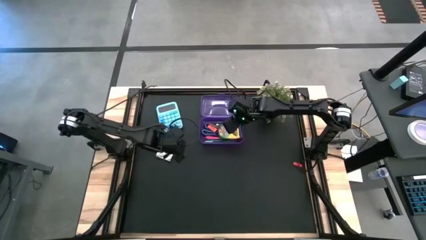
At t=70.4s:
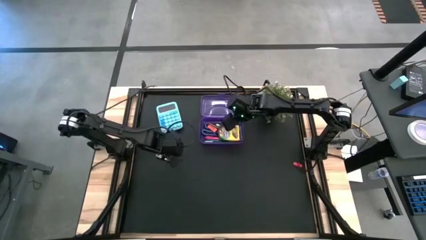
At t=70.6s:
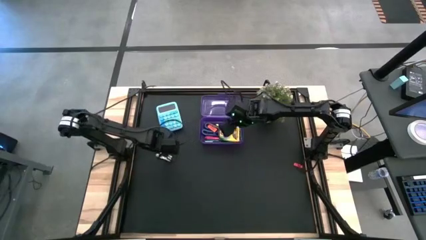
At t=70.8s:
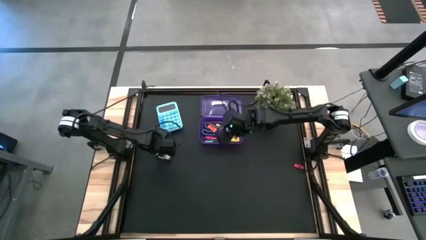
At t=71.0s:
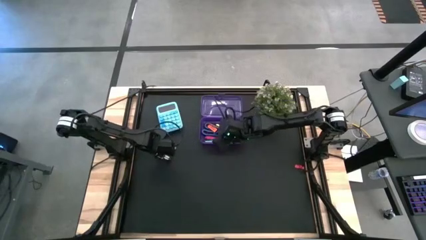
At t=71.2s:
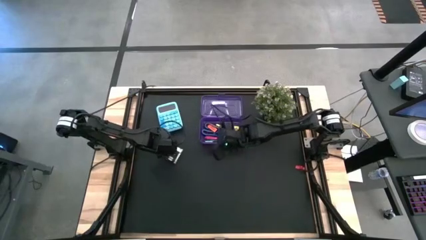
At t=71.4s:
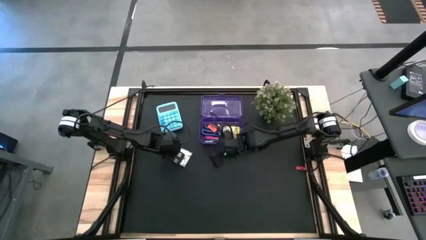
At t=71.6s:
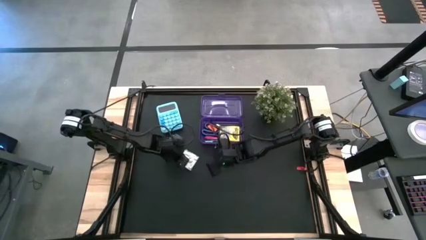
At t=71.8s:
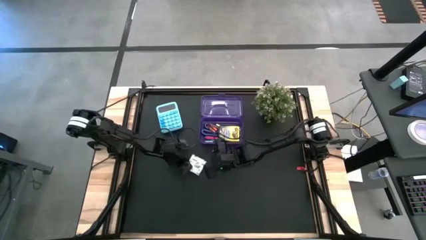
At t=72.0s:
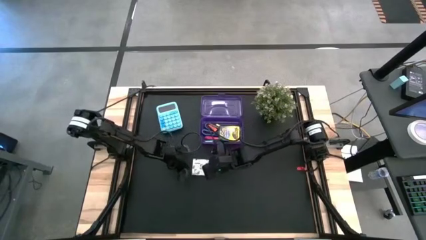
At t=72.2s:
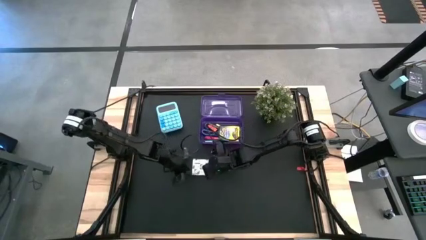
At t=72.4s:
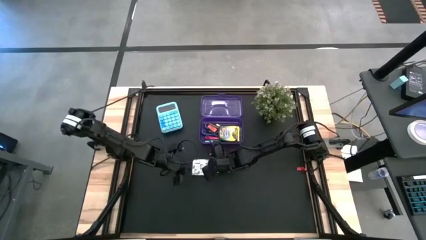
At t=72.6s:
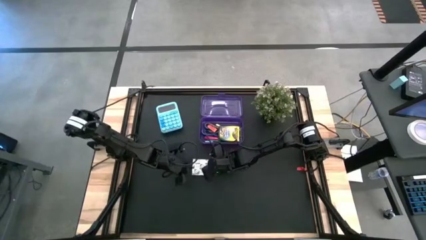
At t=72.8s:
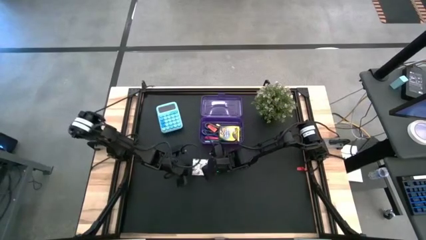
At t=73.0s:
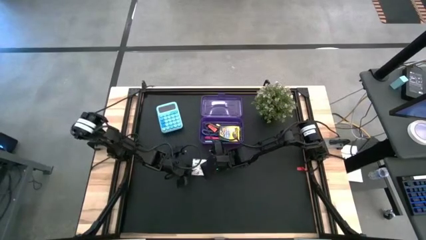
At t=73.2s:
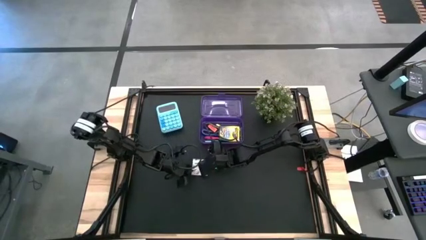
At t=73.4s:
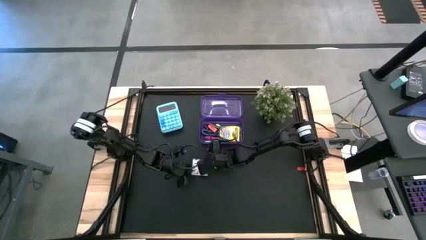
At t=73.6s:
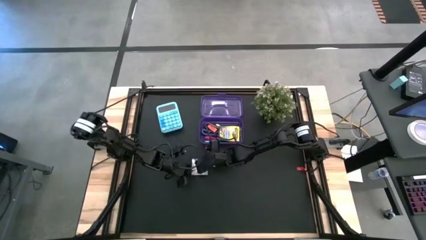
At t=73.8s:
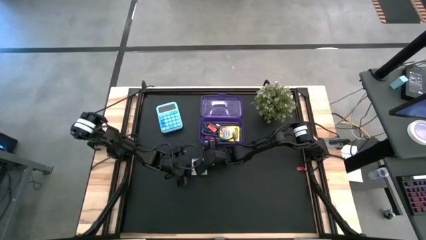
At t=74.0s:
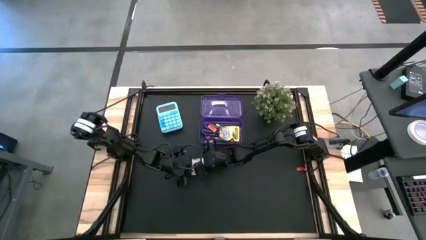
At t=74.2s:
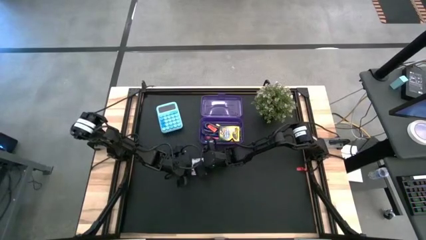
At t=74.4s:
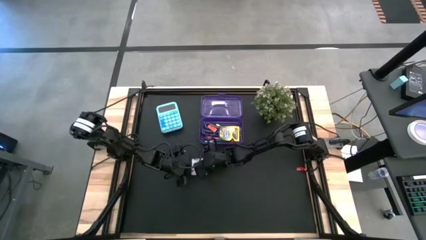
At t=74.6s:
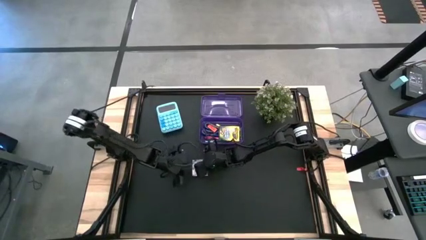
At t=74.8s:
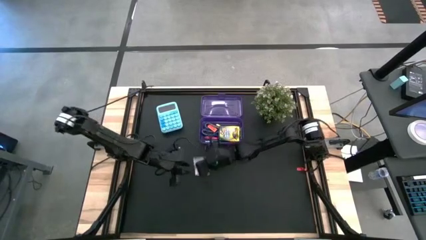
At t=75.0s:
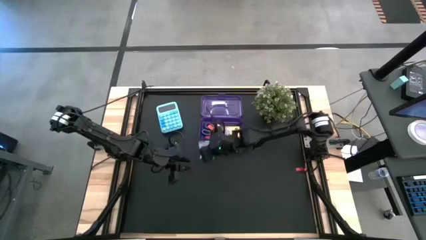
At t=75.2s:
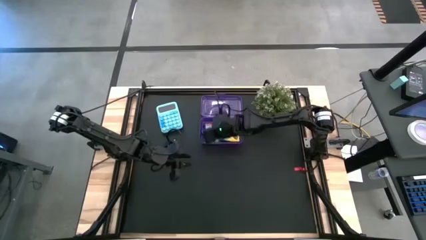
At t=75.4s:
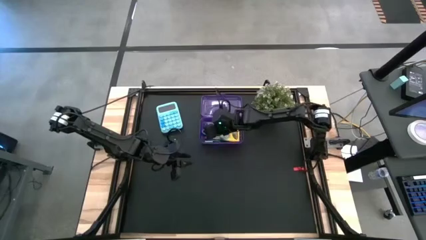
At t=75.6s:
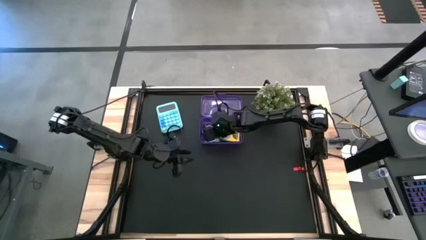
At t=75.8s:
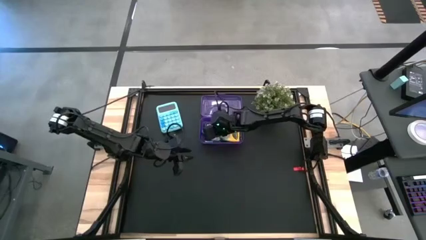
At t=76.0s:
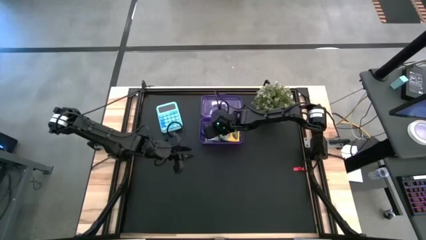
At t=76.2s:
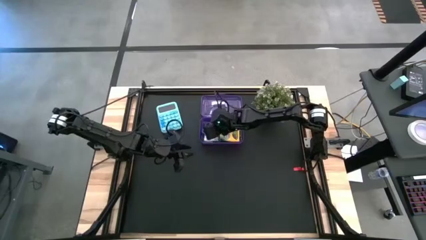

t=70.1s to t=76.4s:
Task: Pack school essentials
Put the white black sticky note into the purple supply box

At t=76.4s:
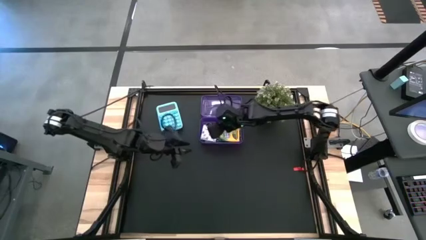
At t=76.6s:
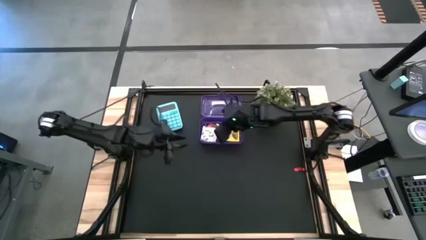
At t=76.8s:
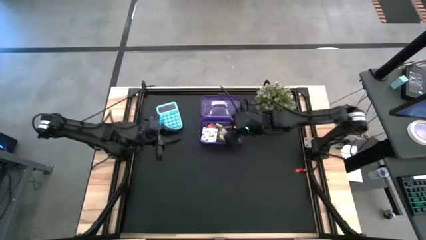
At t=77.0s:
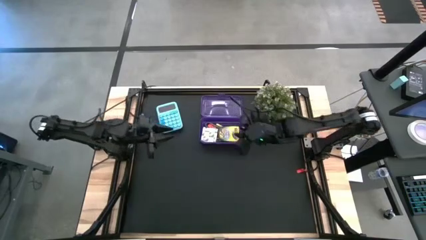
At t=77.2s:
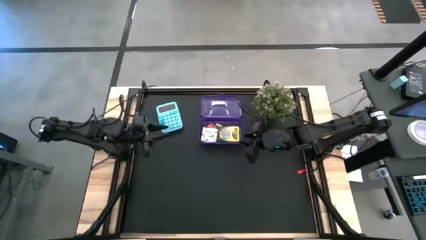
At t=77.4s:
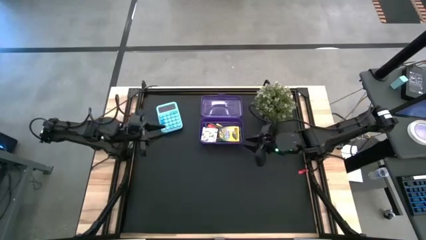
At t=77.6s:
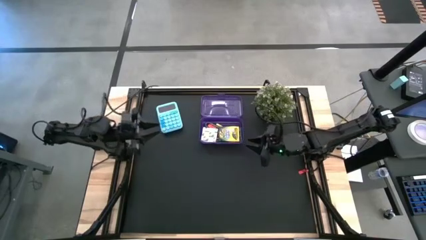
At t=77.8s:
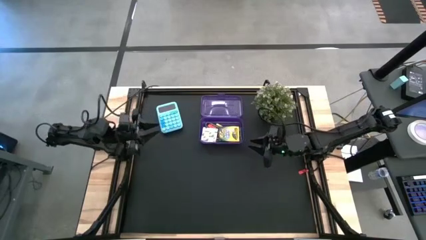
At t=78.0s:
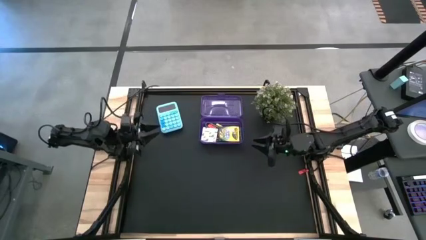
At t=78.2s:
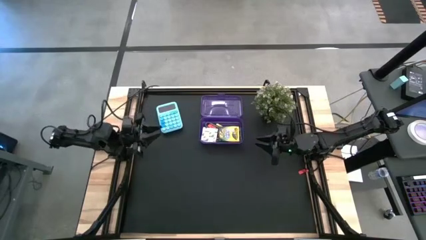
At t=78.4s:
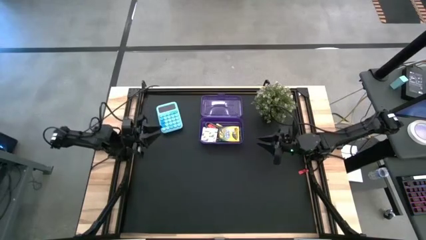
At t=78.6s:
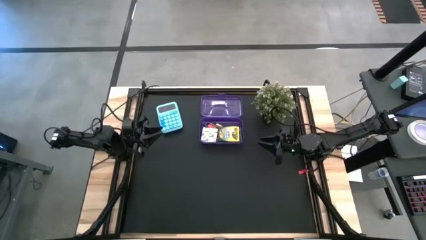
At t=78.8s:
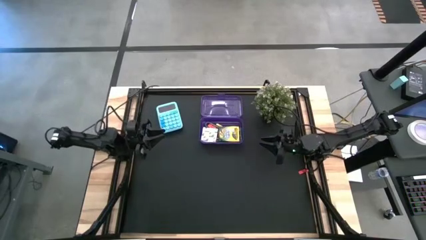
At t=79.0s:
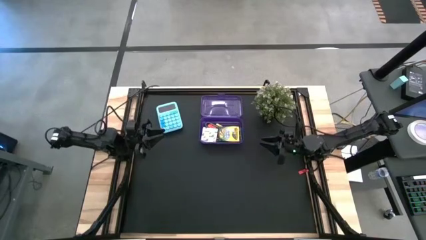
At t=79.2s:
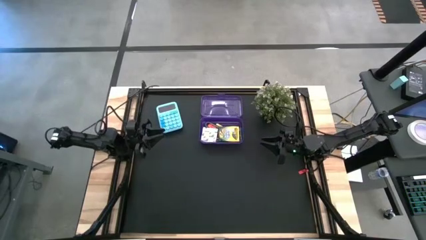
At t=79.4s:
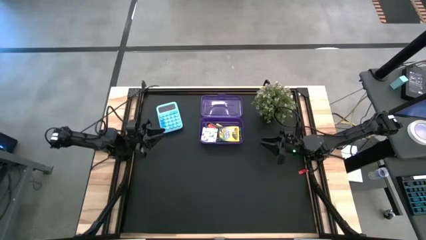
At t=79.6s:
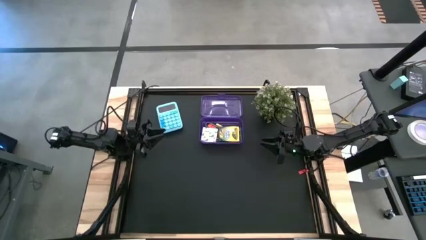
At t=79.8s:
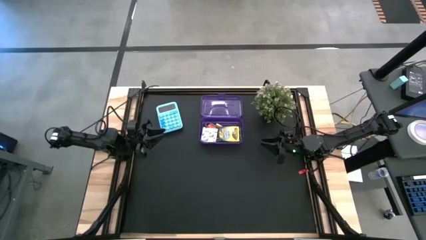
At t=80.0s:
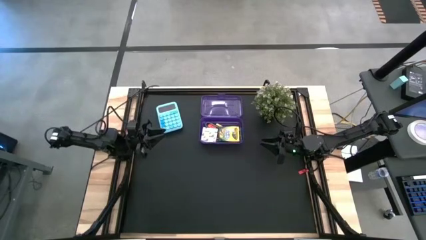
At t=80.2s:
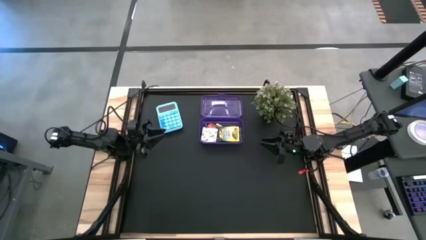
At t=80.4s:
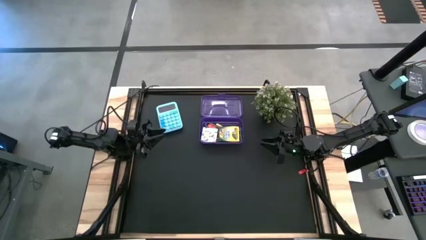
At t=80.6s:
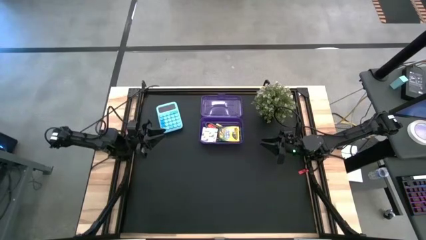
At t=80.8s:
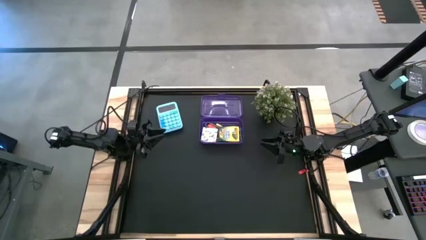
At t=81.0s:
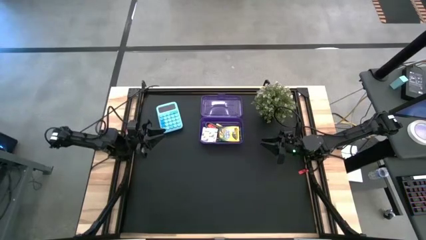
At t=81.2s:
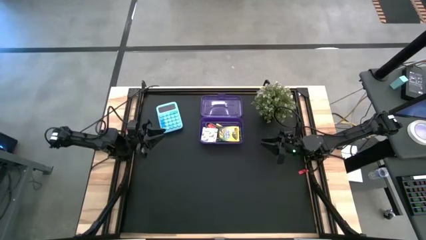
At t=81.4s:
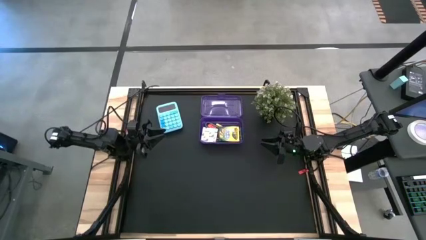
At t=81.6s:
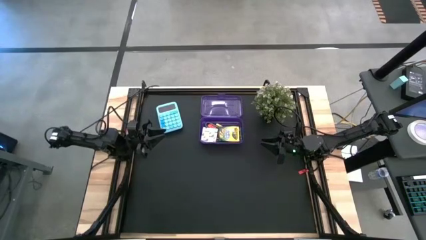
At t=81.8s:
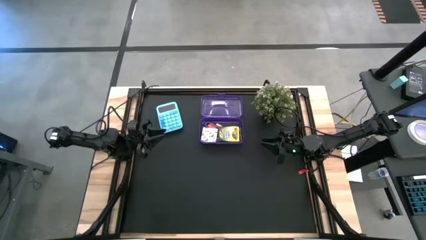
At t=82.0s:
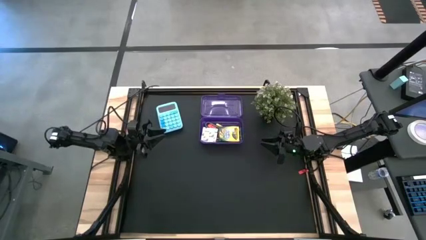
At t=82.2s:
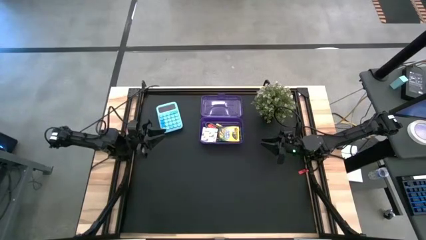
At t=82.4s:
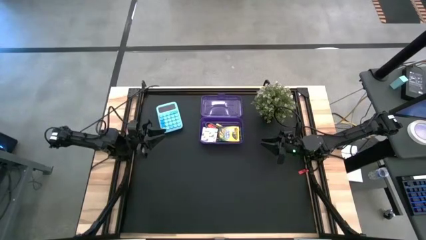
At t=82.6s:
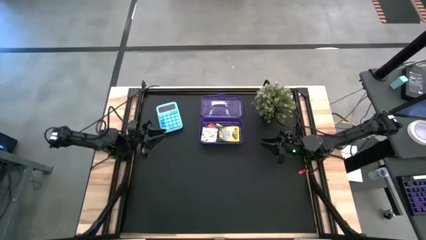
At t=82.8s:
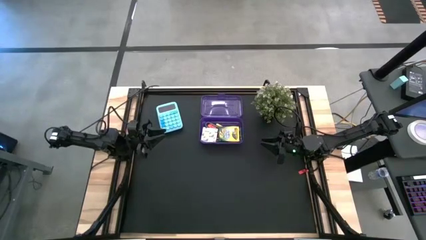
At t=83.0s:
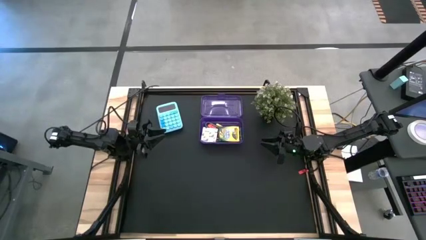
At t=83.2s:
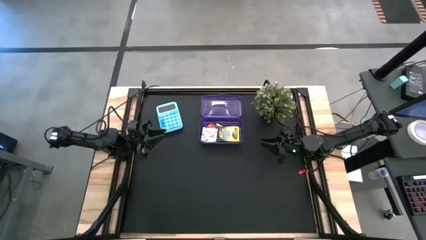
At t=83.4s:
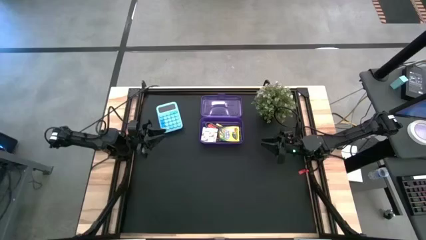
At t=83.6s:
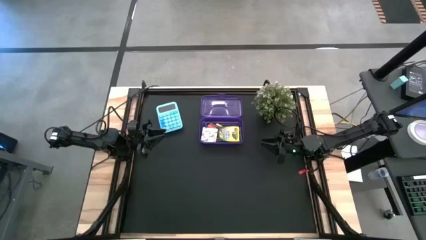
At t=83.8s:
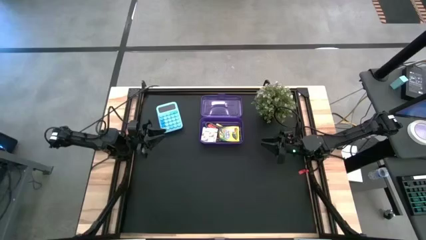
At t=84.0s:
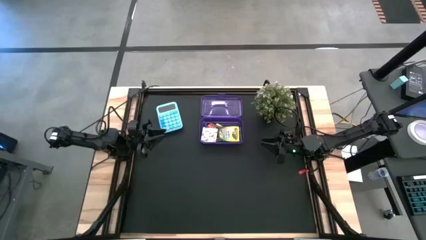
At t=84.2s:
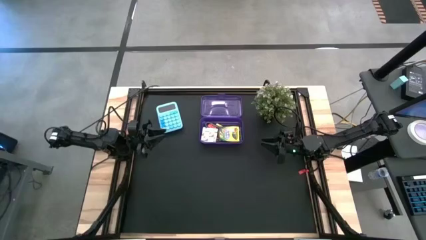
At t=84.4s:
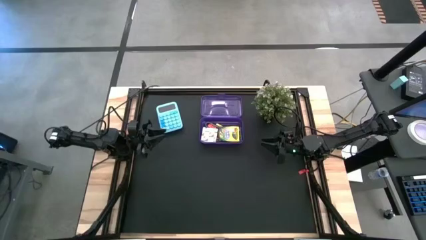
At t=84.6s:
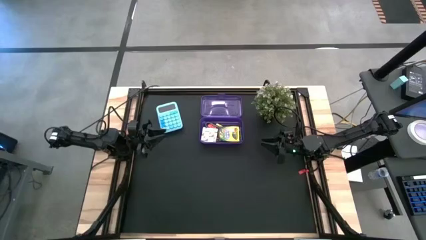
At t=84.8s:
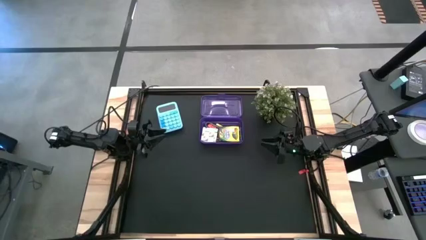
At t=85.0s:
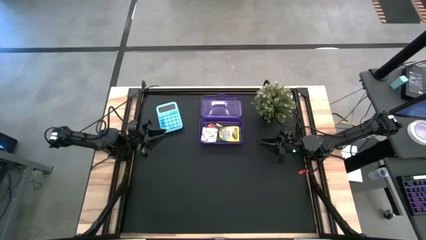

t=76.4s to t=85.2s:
Return to Home Position
